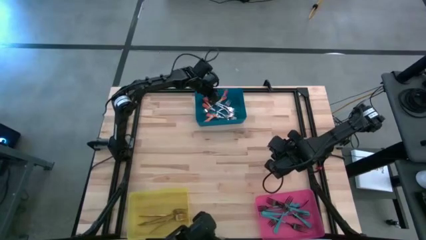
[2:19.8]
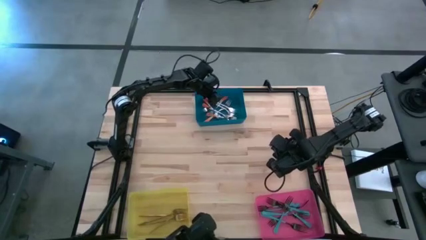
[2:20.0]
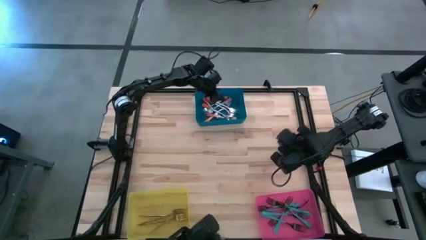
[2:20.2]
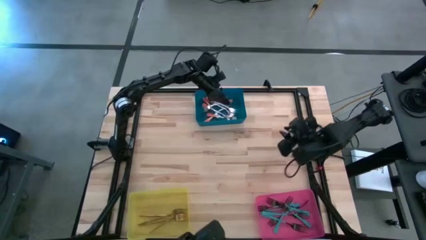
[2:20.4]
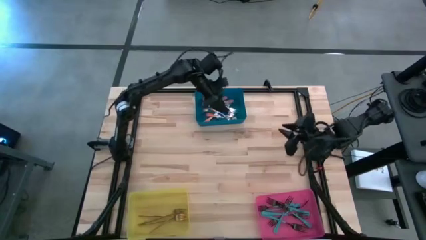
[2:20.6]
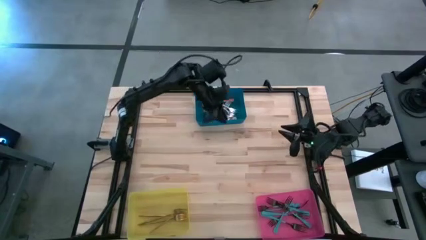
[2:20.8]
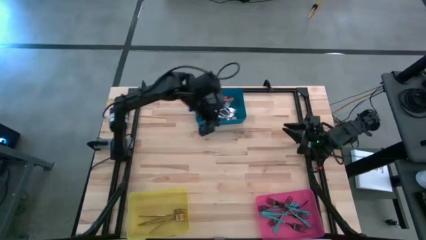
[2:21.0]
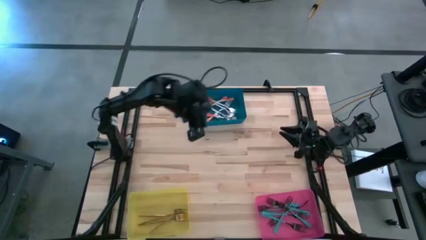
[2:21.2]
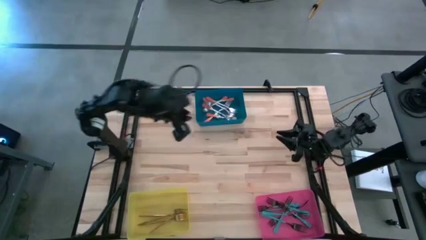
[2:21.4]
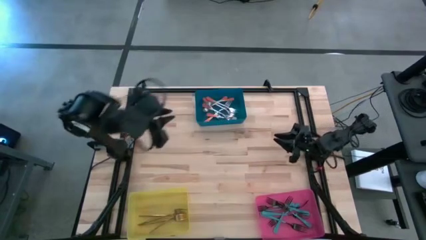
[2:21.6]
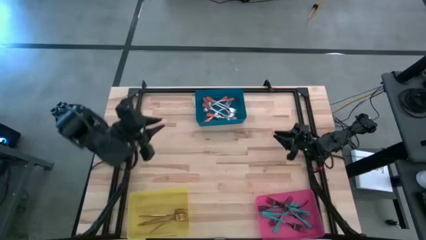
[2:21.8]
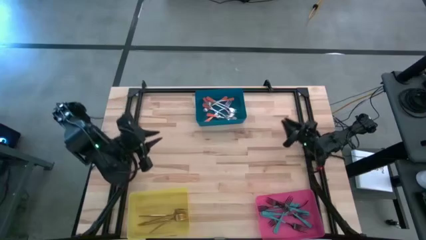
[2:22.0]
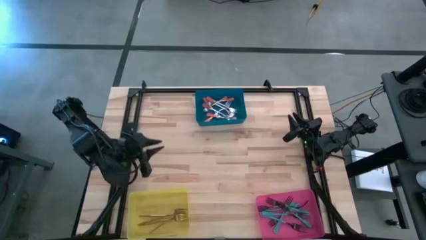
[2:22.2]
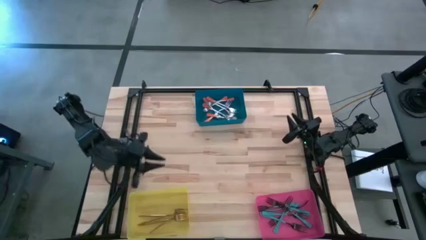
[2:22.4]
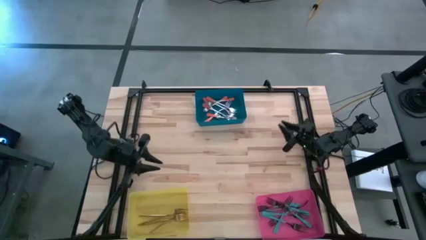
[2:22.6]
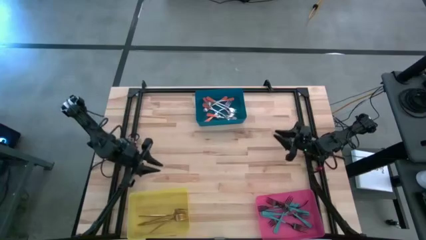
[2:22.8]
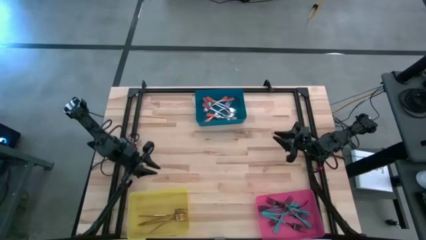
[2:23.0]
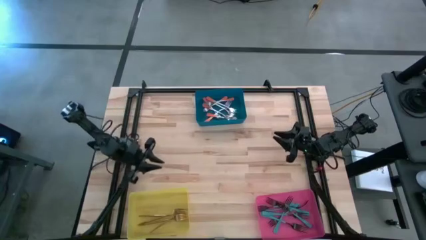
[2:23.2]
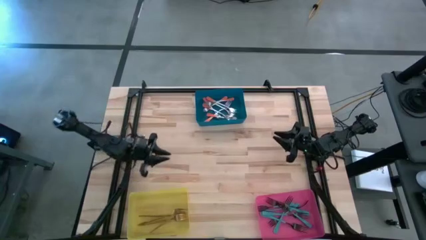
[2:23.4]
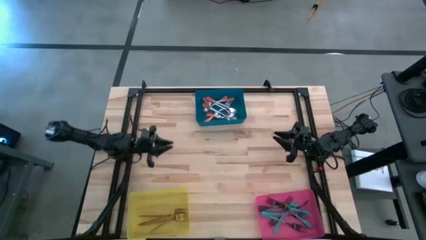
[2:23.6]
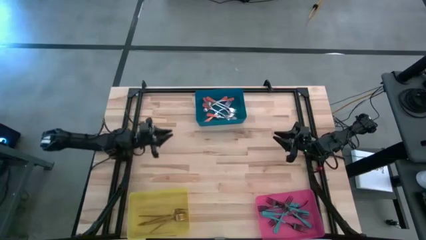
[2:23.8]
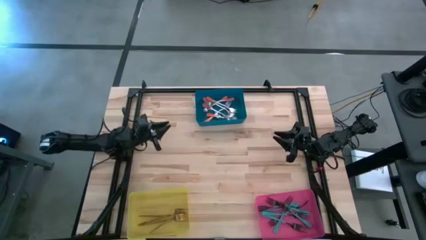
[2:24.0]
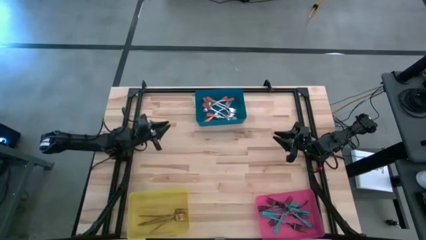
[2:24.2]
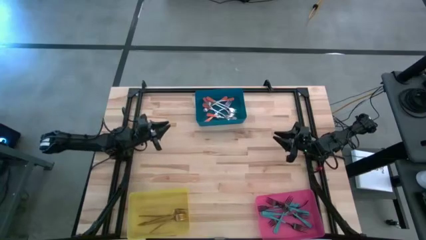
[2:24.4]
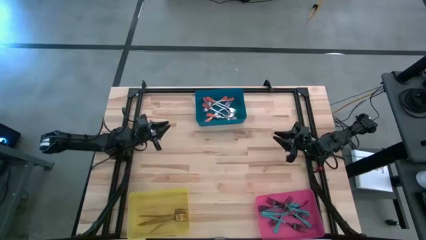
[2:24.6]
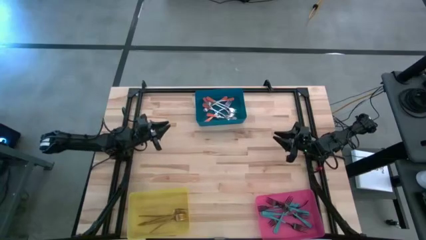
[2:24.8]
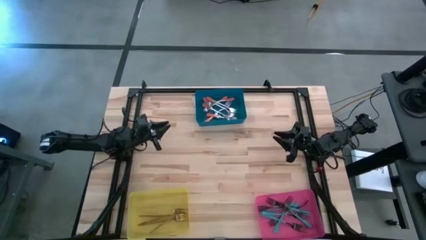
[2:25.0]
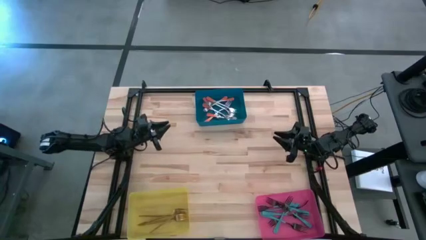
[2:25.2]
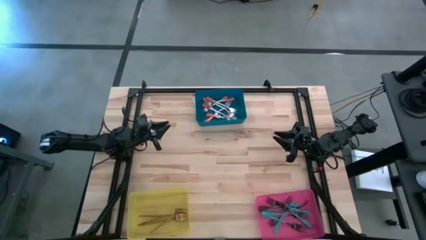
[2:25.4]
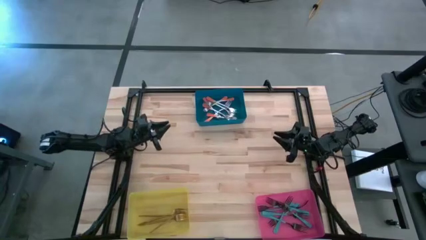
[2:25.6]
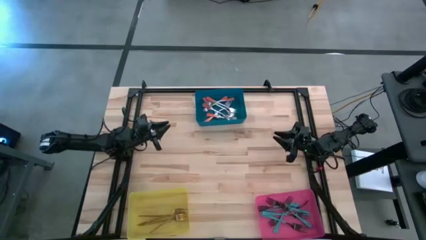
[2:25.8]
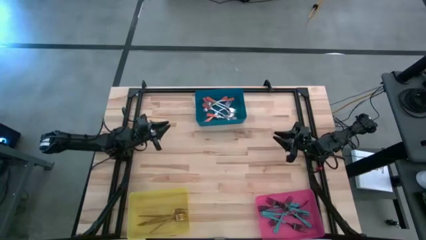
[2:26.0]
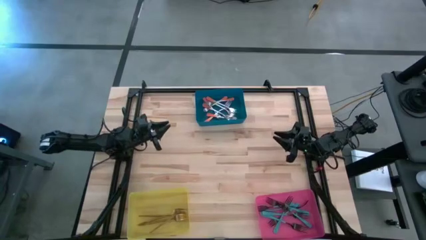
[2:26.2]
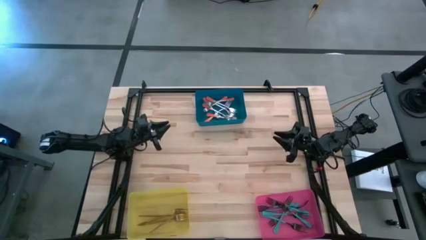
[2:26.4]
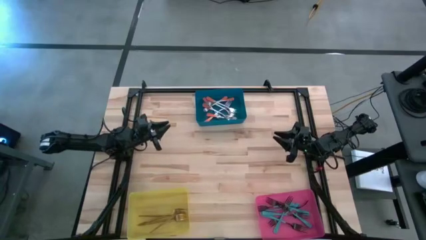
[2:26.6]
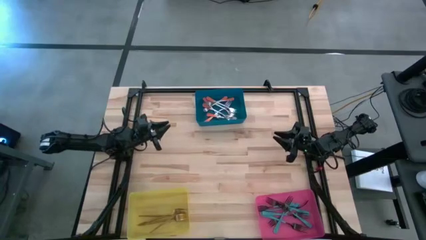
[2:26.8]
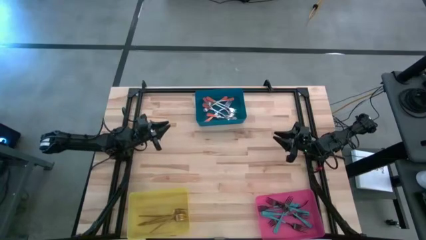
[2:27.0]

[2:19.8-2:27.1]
Task: Sort silverware by color (type)
Return to Home Position

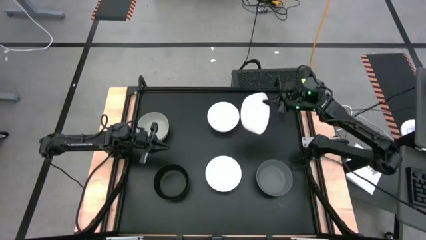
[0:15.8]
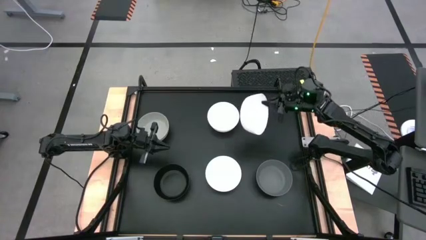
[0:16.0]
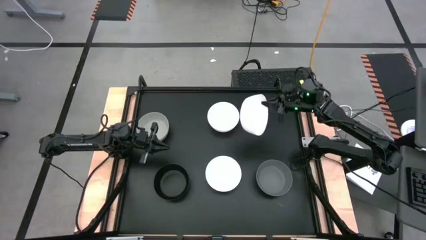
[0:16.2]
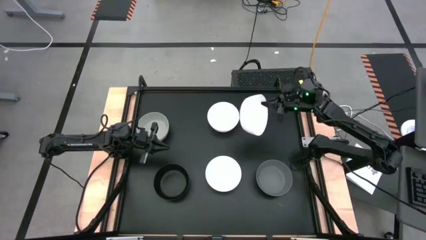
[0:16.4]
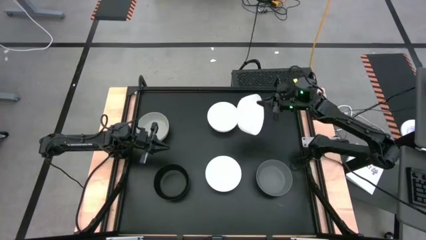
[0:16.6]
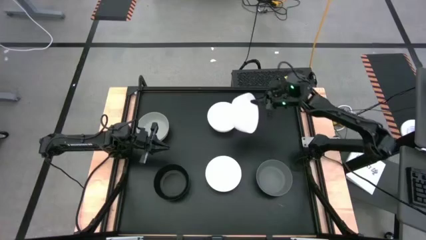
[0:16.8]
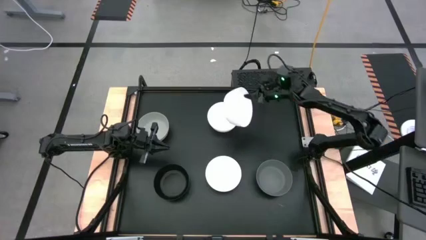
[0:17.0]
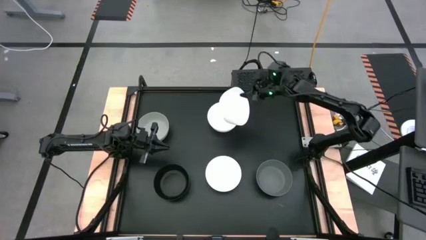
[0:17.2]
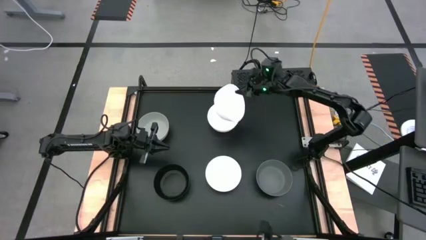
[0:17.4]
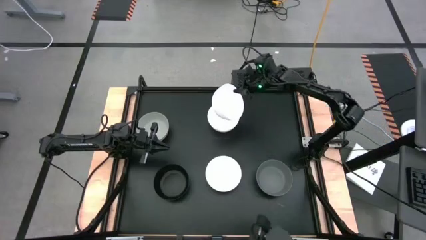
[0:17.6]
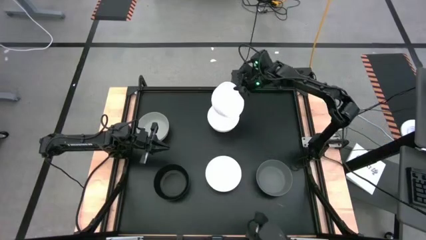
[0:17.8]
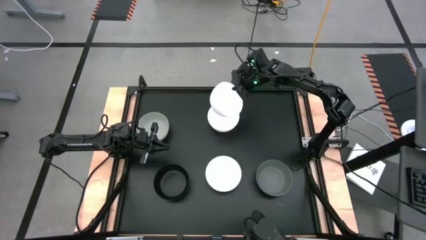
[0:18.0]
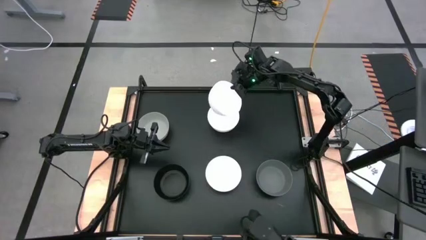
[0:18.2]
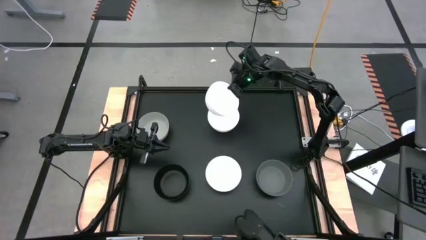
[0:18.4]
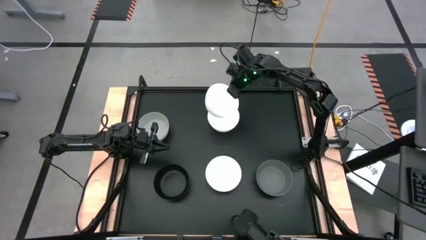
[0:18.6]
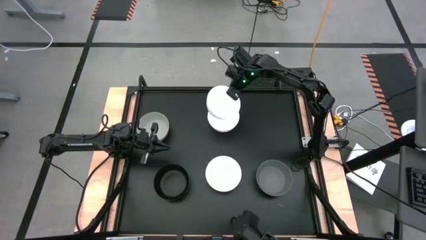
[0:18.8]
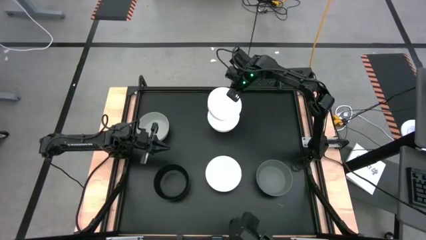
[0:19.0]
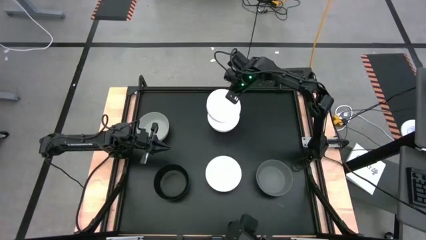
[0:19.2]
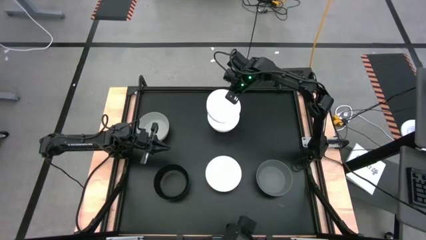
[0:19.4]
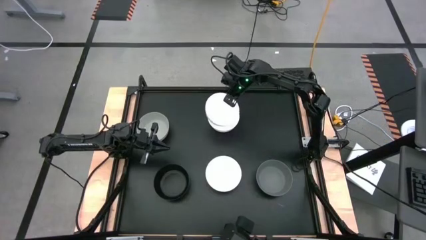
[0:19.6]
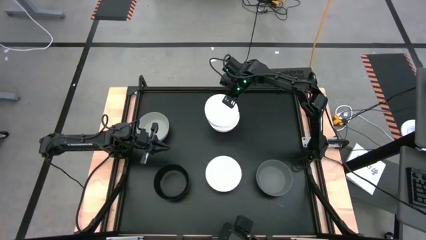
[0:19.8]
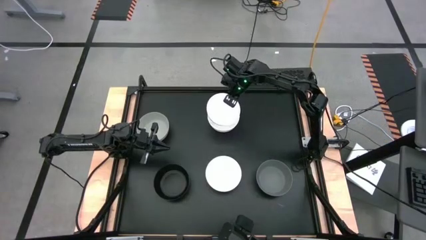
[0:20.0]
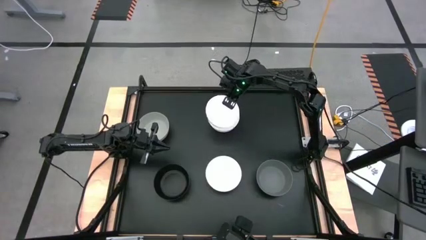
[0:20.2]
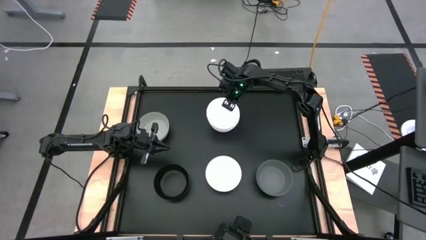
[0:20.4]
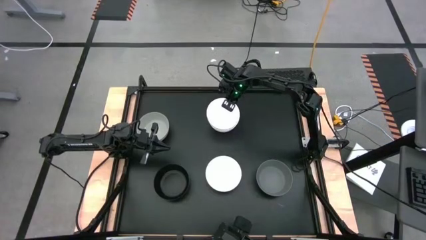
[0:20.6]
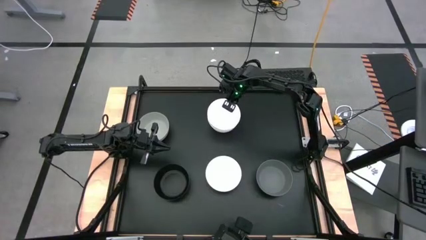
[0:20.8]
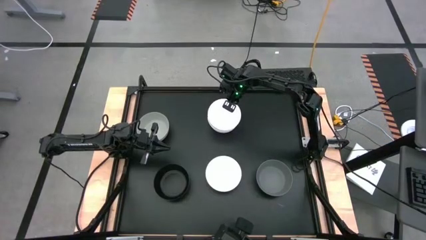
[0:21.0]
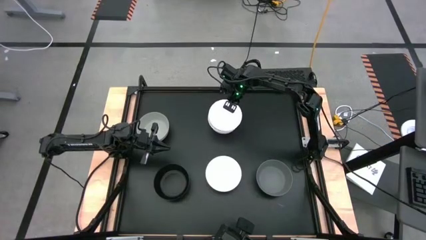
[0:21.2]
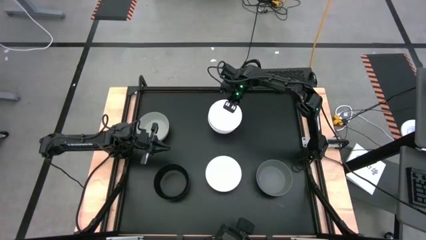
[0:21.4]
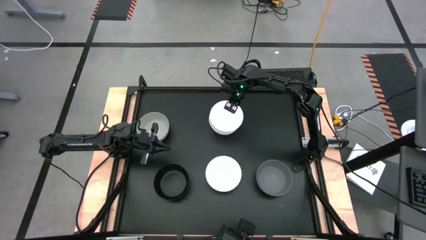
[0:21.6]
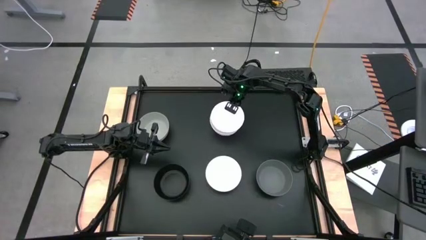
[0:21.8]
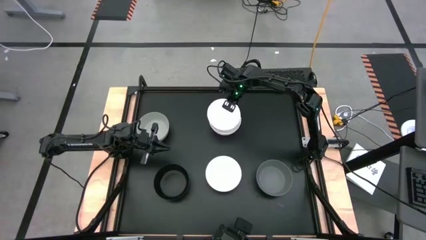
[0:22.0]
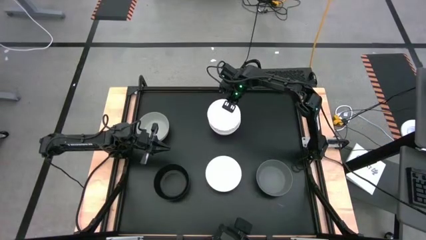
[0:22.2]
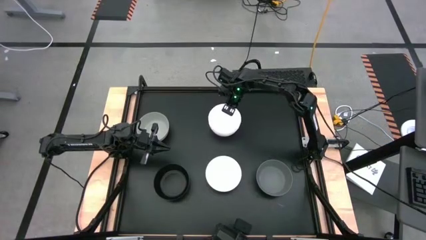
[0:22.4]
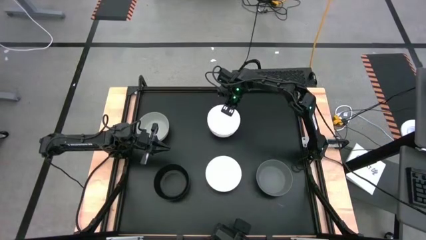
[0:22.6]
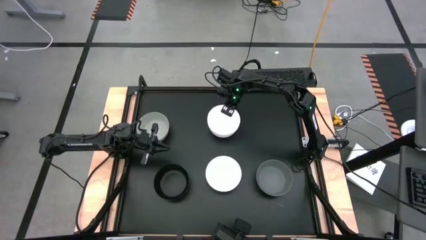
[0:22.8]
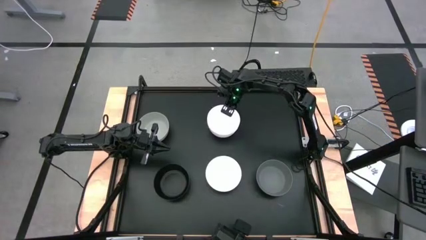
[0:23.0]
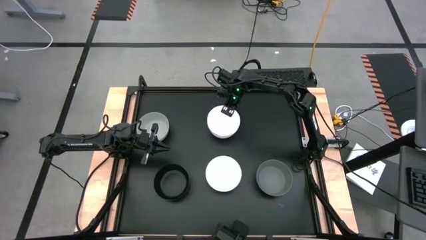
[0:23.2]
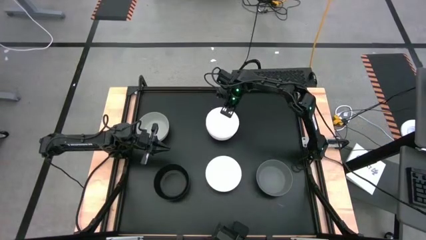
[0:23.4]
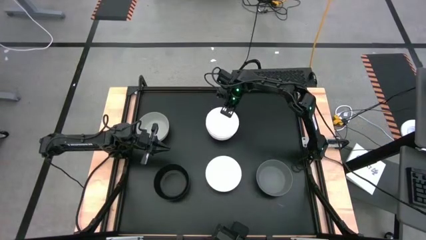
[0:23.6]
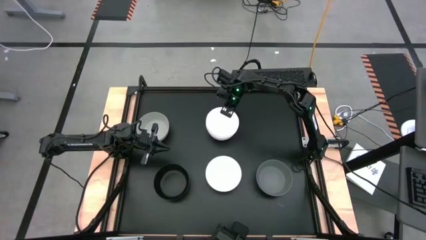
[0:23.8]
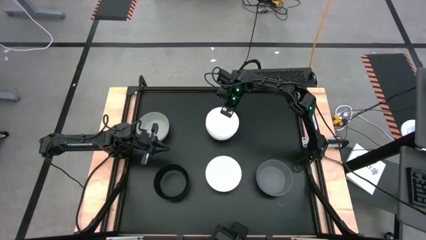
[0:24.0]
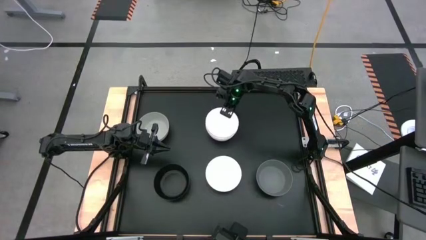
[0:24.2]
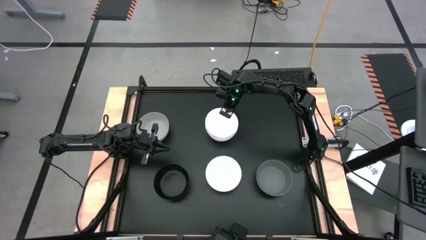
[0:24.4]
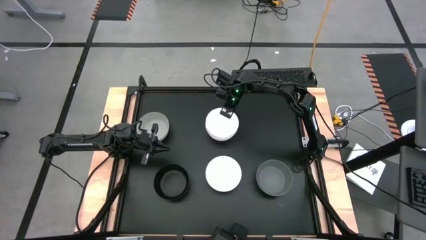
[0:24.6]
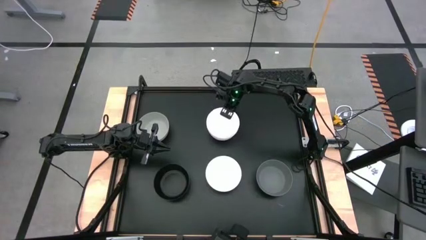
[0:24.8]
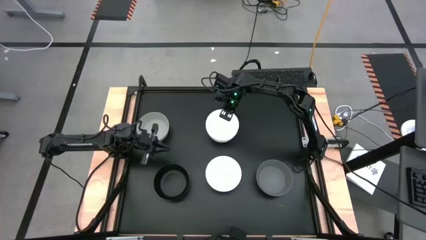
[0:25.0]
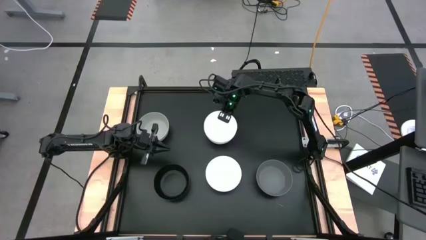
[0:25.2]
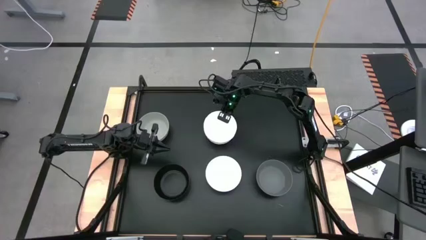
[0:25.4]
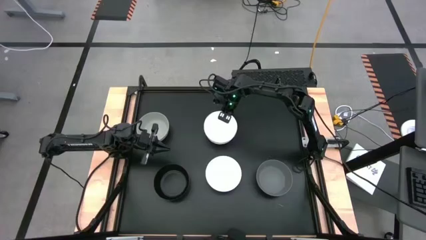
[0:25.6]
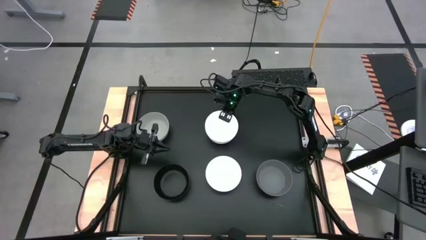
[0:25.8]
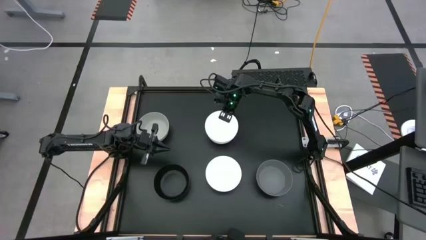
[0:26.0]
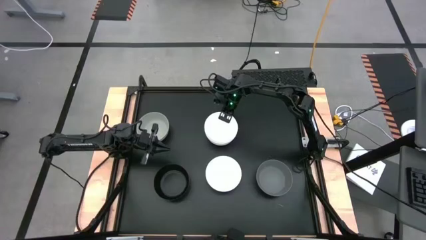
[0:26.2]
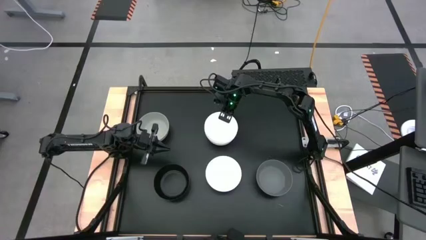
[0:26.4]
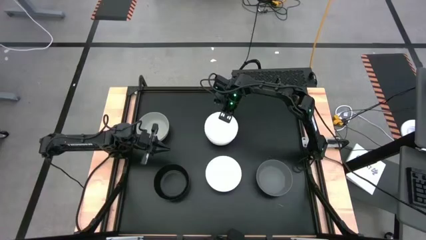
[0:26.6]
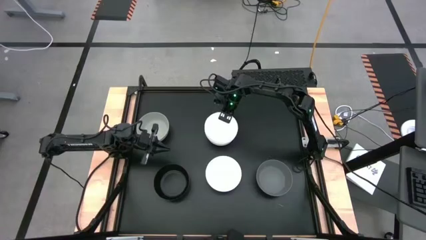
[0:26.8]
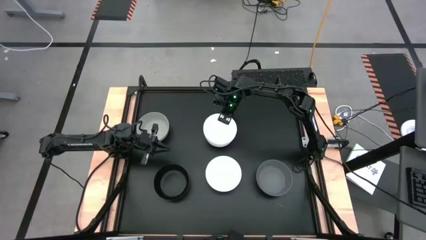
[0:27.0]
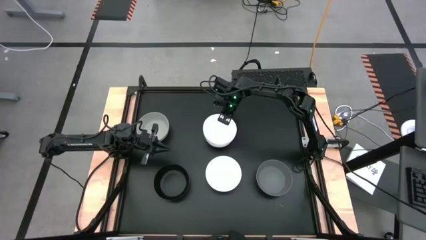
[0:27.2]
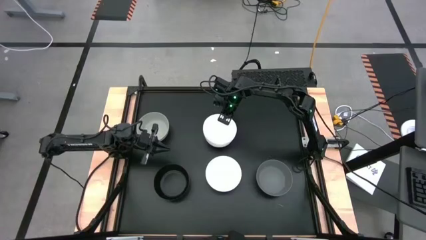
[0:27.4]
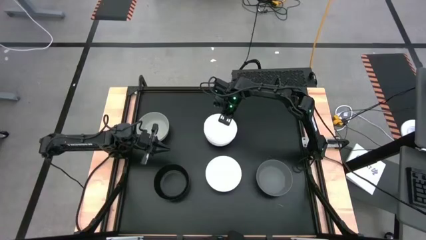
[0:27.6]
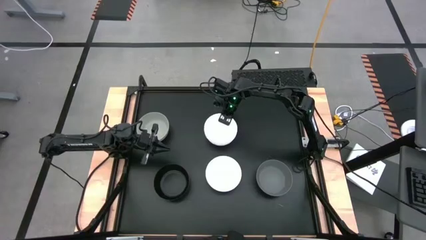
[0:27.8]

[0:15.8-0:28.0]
Task: Nest bowls inside each other
Stack the top right white bowl on the top middle white bowl
